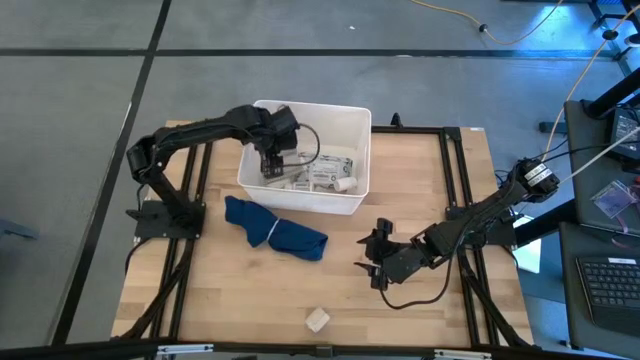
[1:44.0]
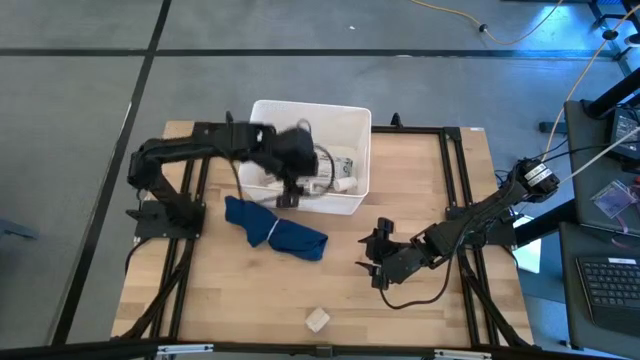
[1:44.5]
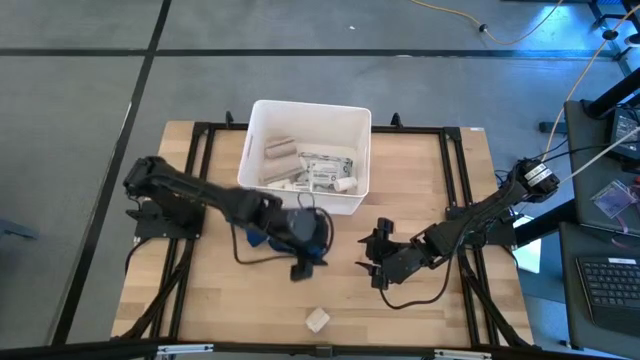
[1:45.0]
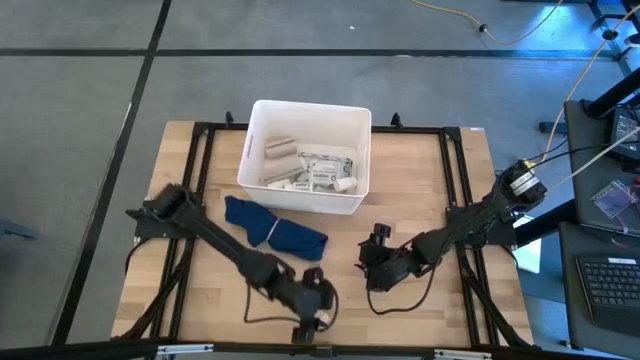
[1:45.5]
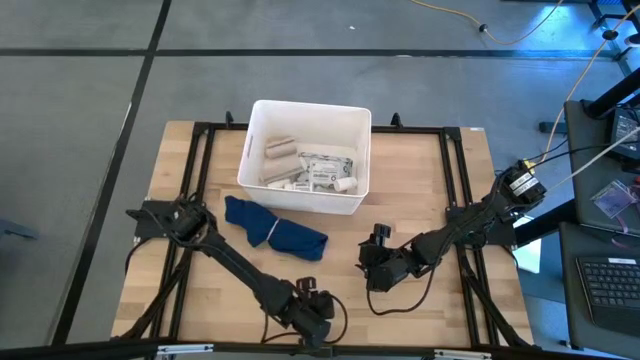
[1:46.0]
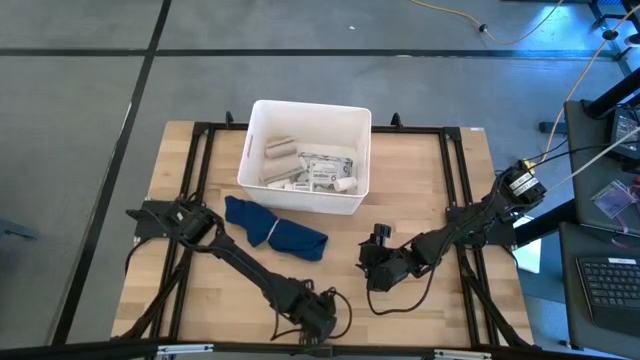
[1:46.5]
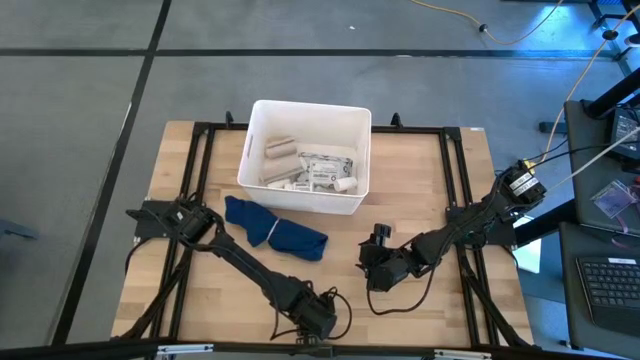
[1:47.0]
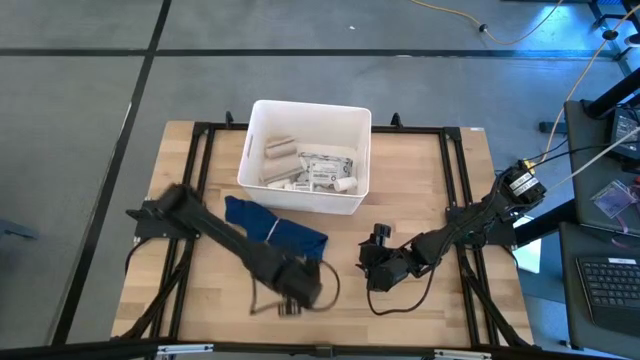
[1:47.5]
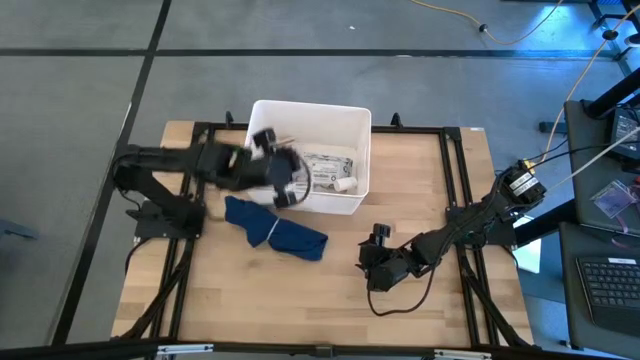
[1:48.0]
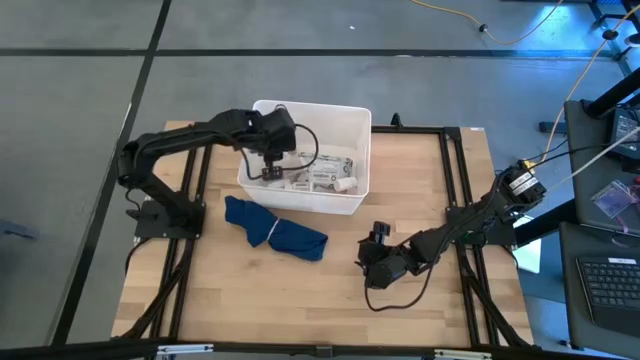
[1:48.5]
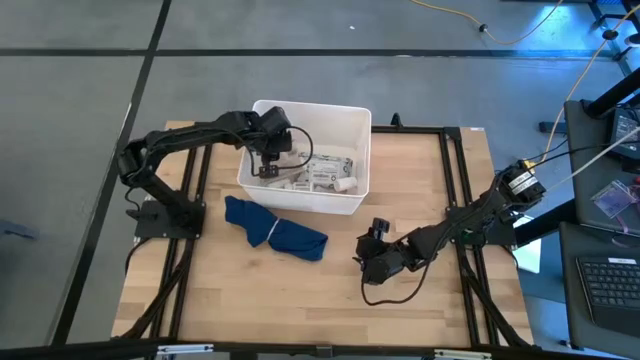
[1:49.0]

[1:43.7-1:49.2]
Task: Pick & place medical supplies in basket/bin
Put the light brown bandage into the white bin

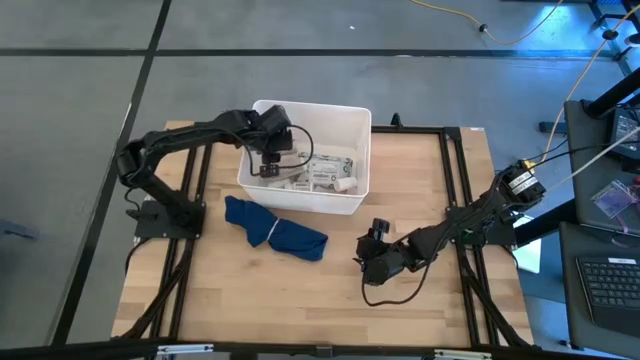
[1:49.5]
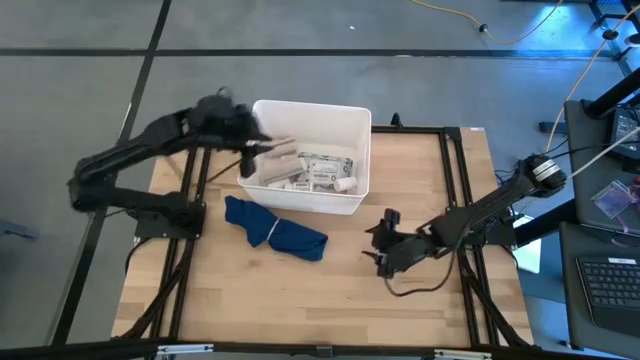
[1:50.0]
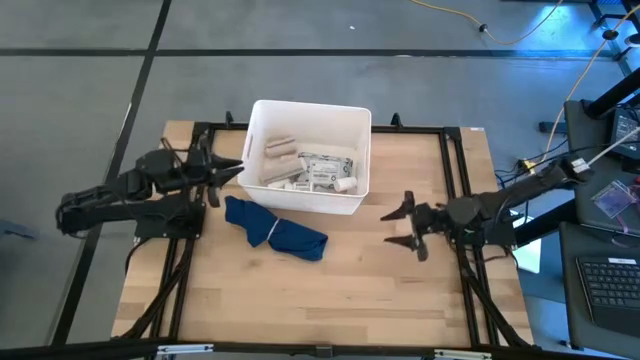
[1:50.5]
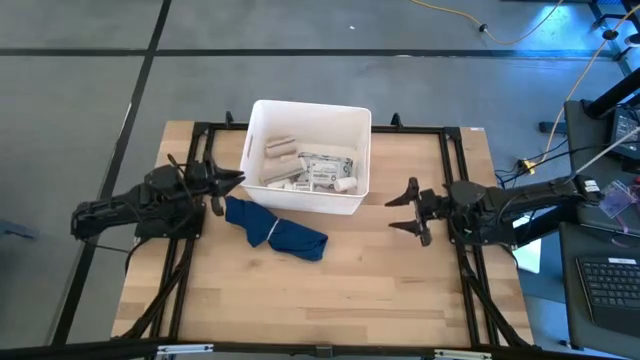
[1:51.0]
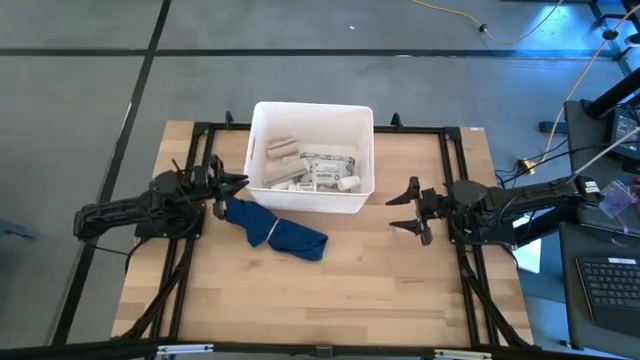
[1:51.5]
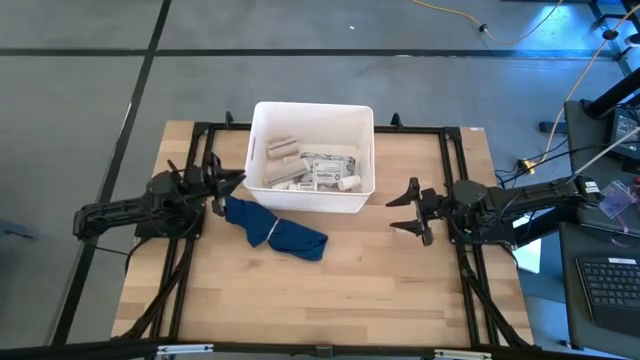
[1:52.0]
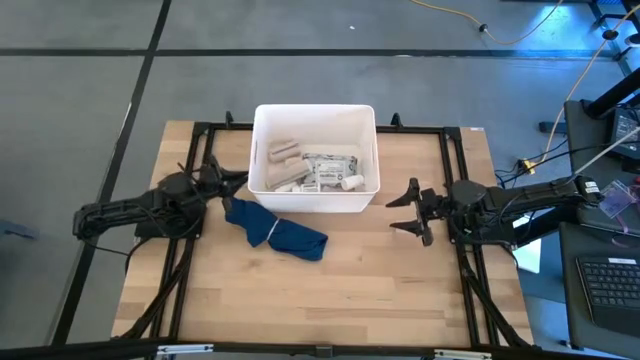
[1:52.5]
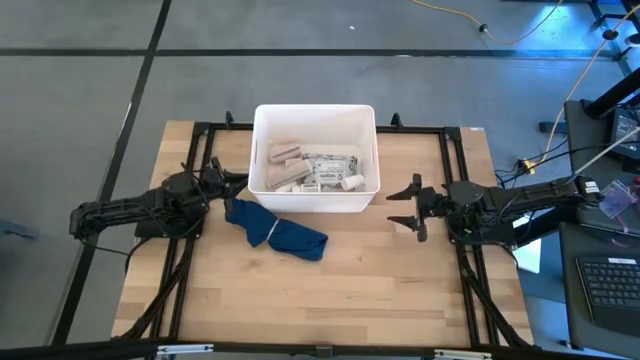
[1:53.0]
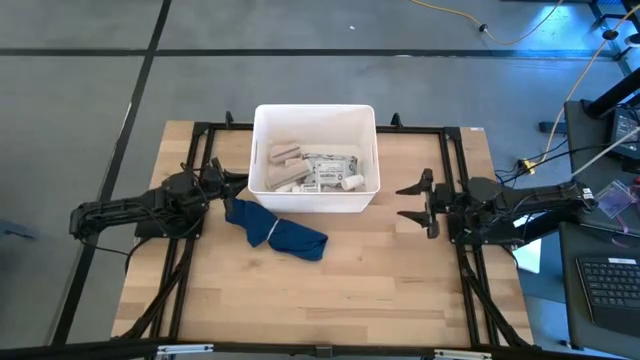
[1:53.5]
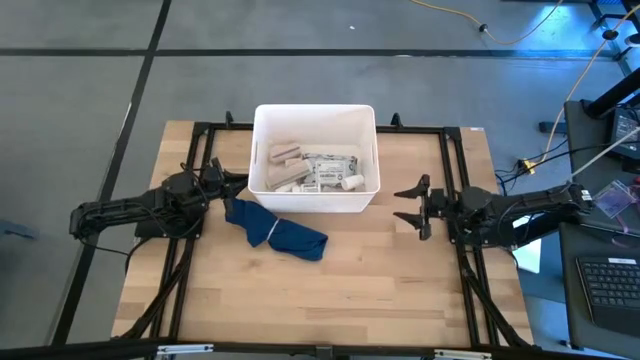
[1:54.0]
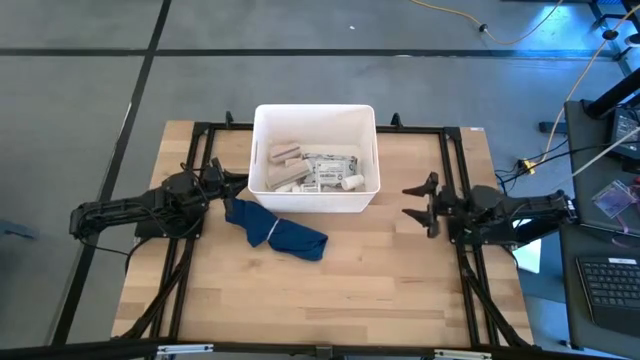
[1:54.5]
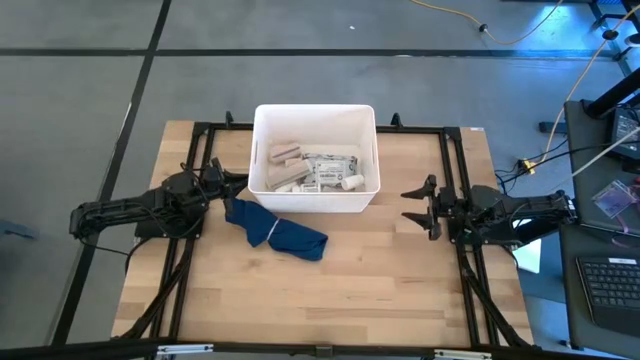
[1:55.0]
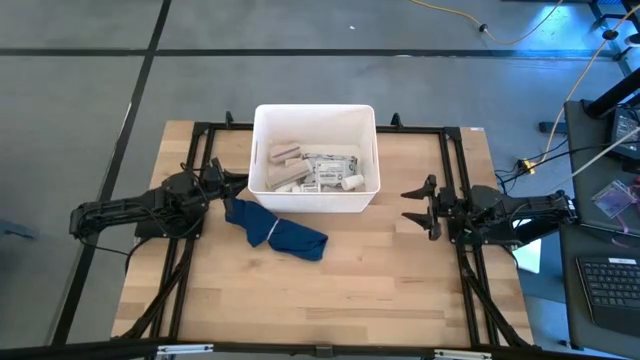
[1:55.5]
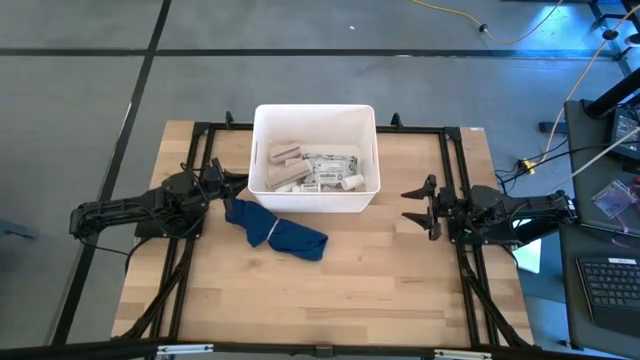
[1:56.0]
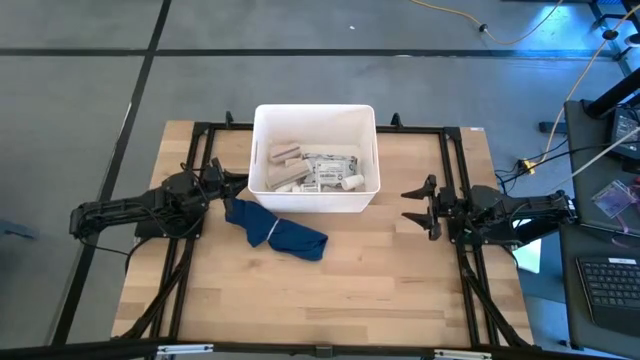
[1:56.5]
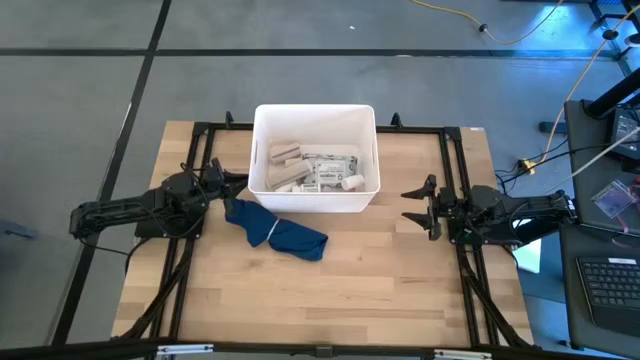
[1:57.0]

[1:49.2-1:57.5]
Return to Home Position

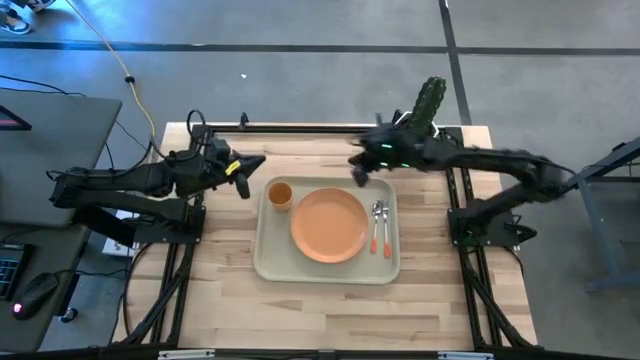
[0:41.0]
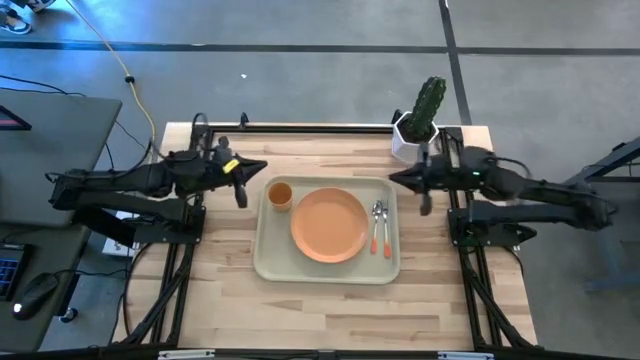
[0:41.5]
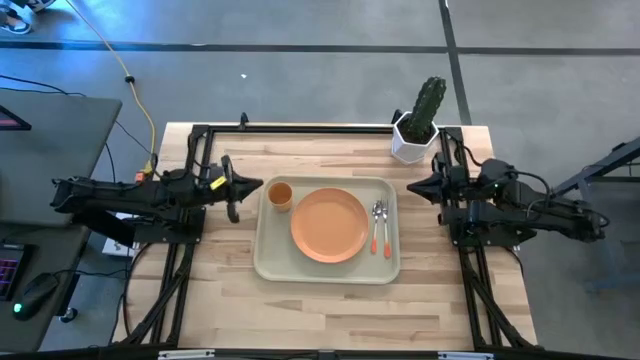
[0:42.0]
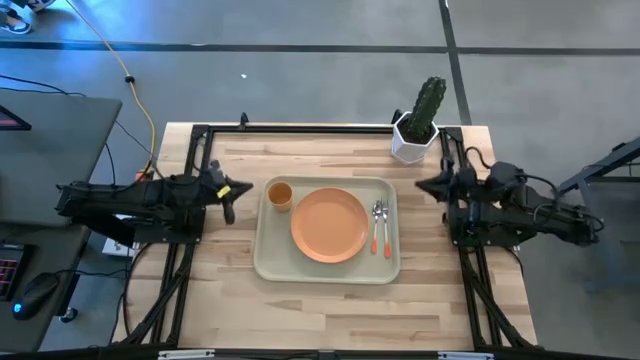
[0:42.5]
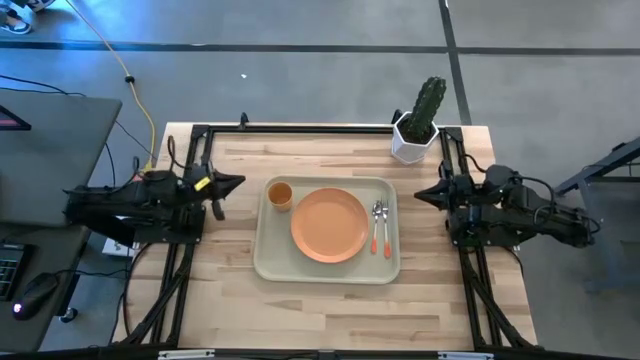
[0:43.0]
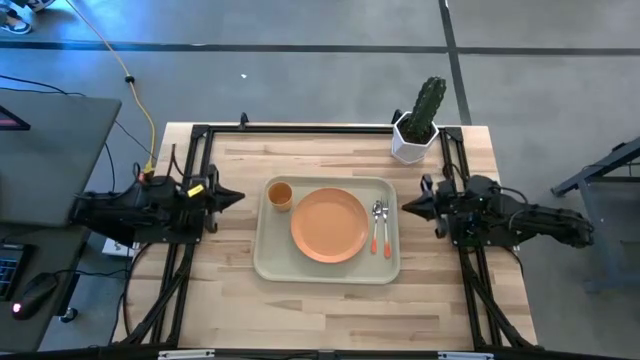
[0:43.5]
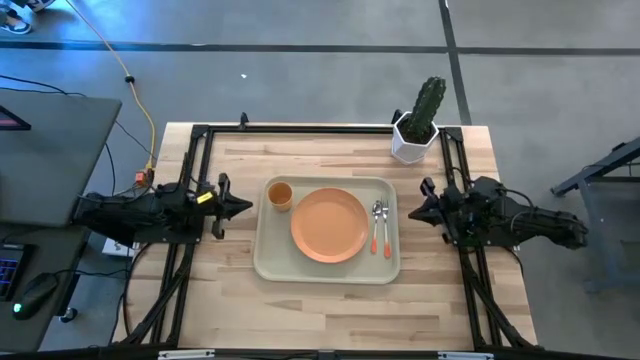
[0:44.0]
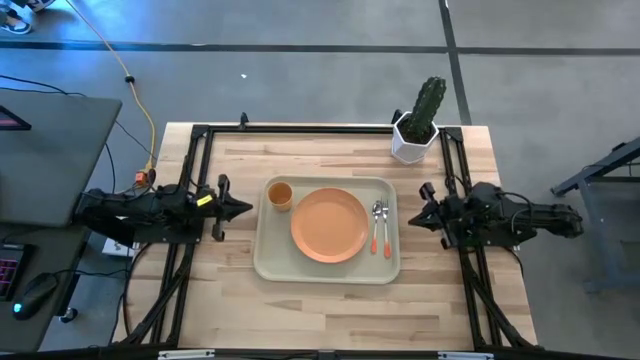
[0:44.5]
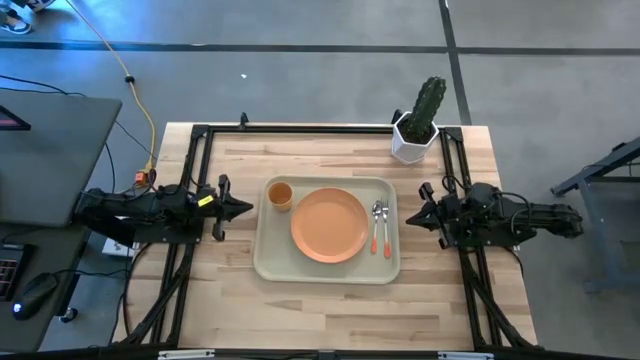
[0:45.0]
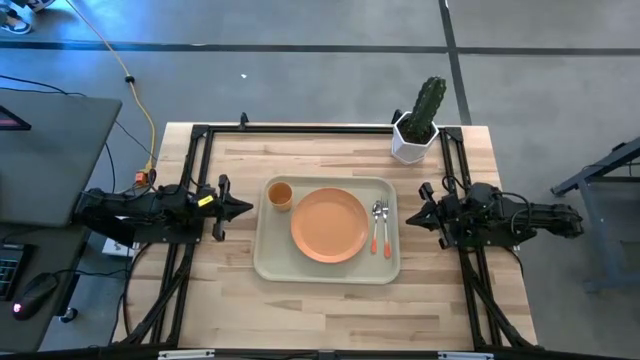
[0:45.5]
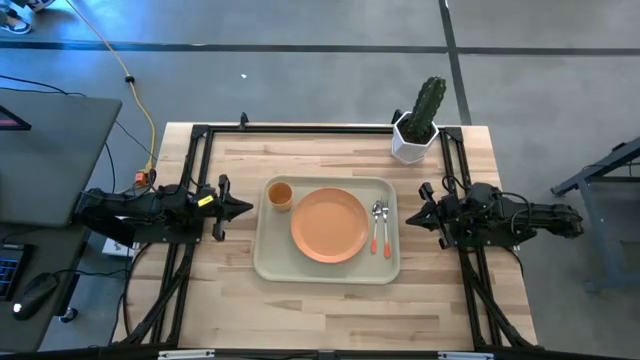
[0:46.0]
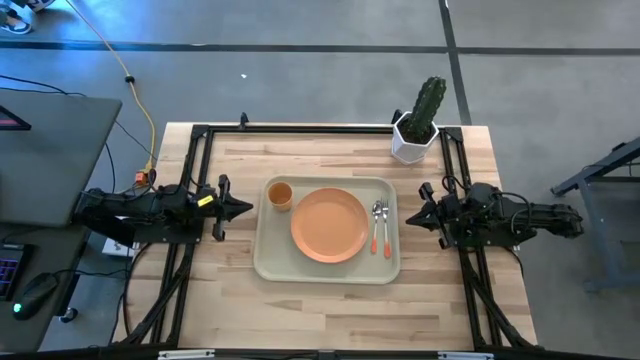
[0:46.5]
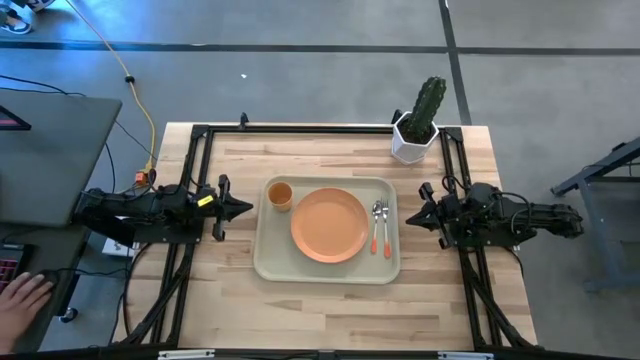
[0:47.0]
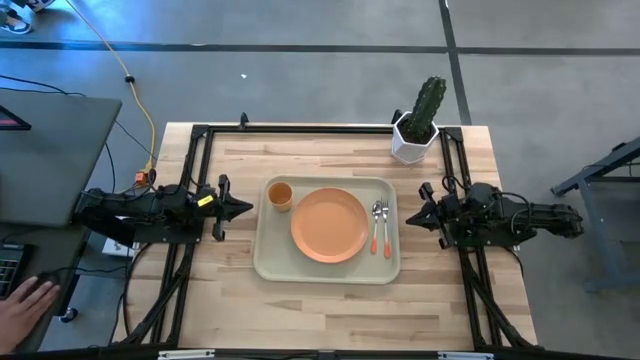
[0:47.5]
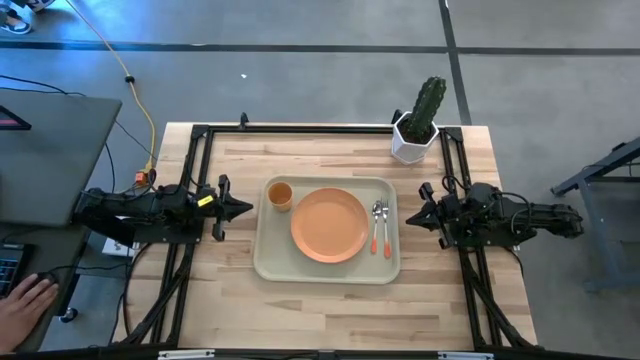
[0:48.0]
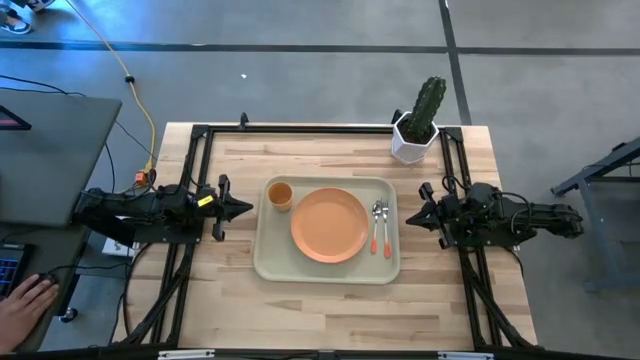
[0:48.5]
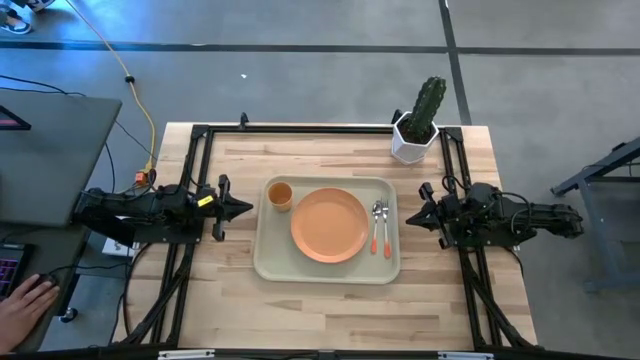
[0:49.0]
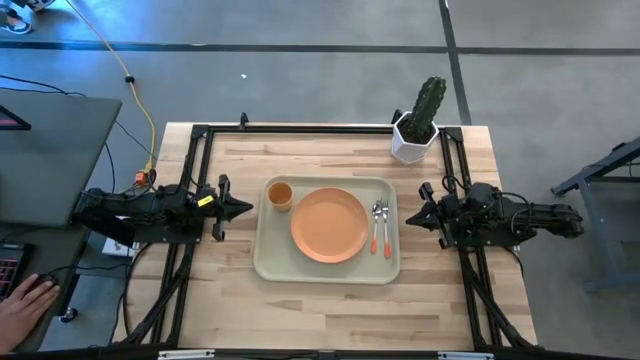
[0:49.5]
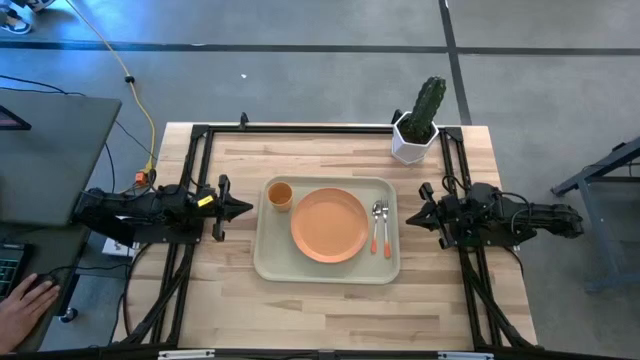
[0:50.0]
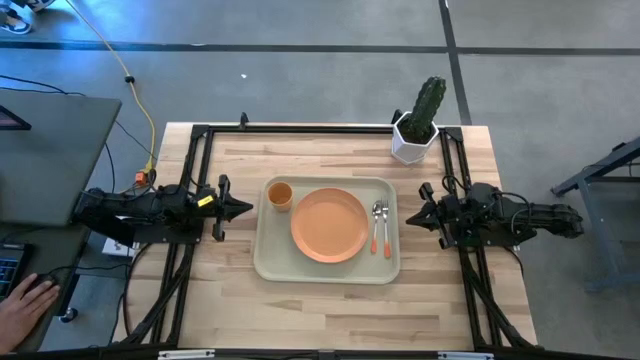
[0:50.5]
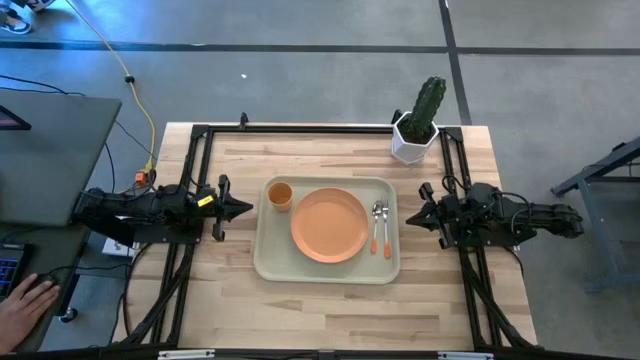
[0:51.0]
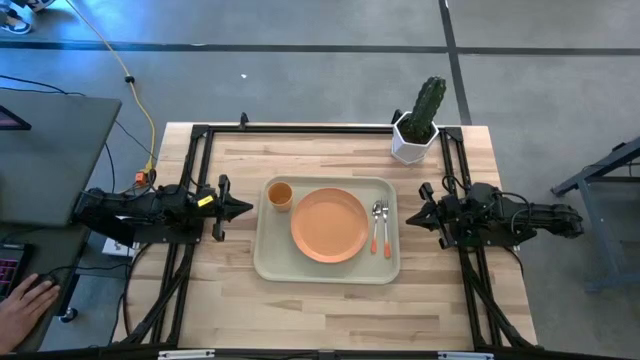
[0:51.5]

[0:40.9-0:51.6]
Task: Pick and place plate/cup/fork/spoon on tray
Return to Home Position
